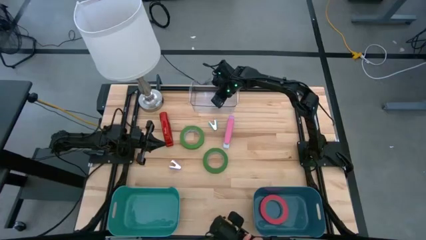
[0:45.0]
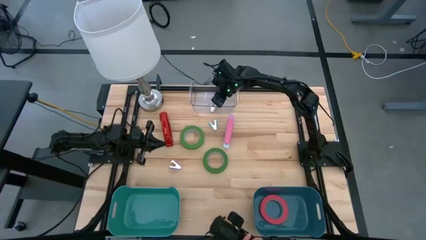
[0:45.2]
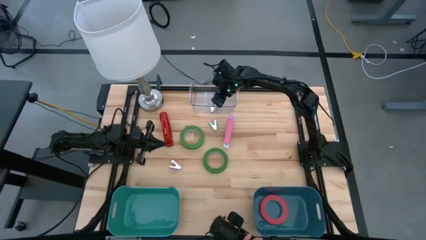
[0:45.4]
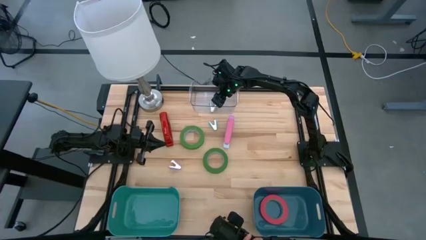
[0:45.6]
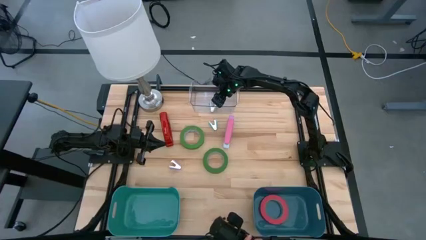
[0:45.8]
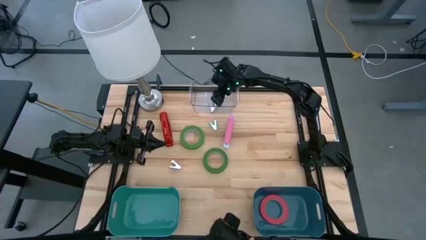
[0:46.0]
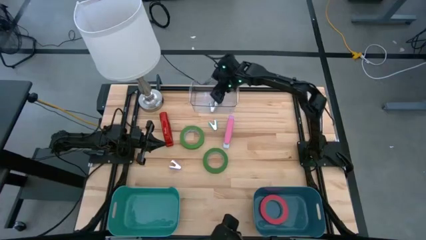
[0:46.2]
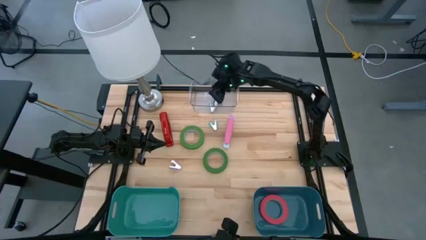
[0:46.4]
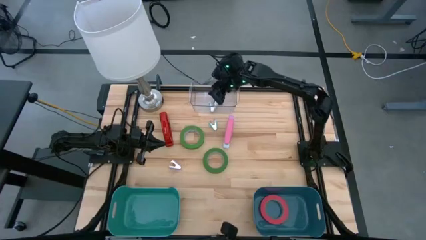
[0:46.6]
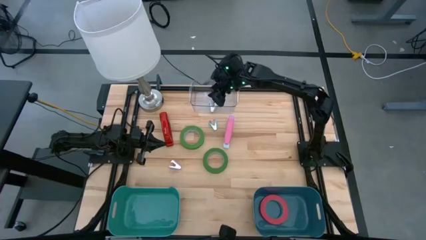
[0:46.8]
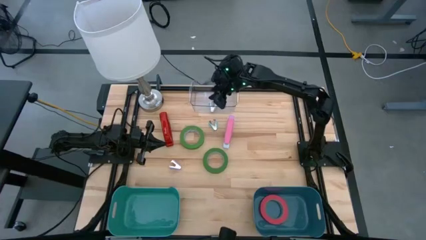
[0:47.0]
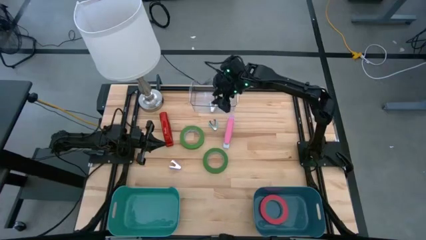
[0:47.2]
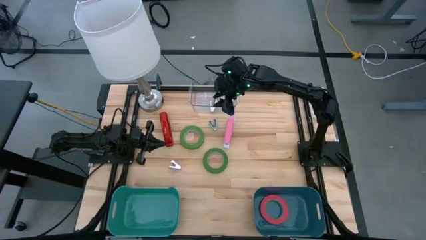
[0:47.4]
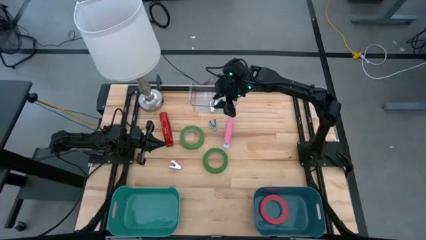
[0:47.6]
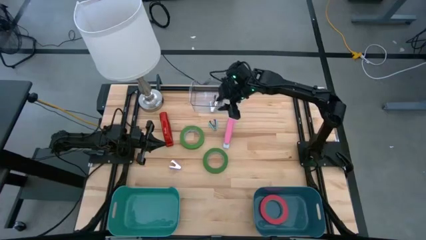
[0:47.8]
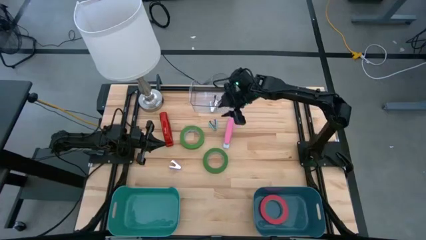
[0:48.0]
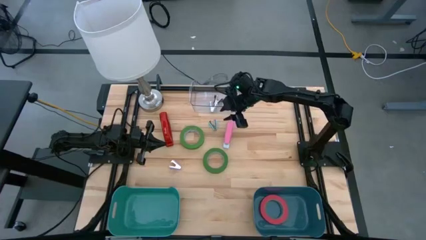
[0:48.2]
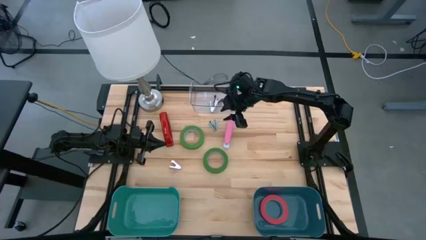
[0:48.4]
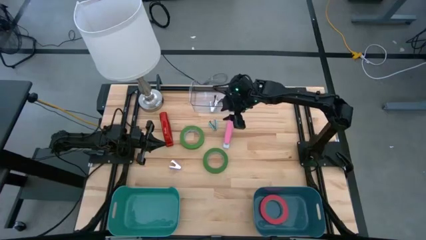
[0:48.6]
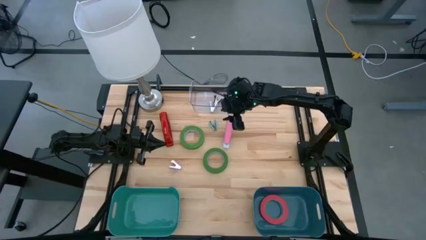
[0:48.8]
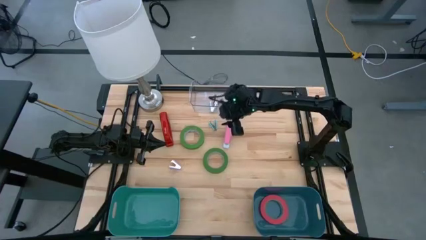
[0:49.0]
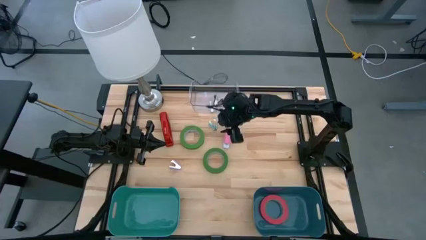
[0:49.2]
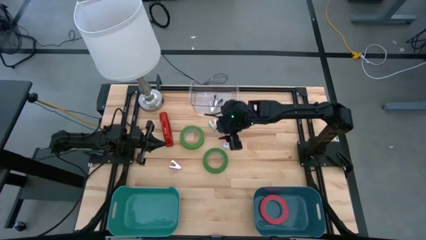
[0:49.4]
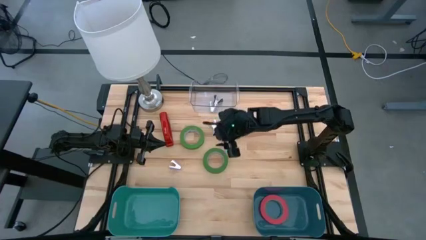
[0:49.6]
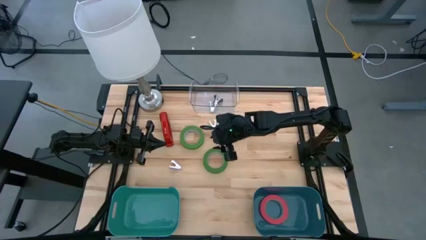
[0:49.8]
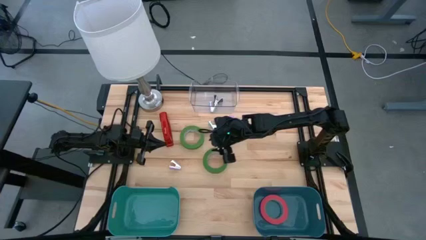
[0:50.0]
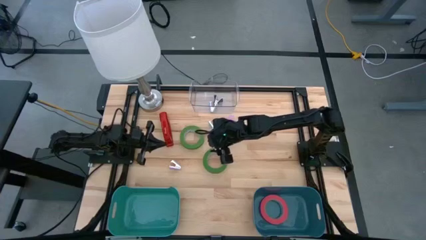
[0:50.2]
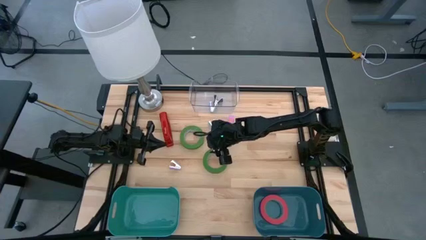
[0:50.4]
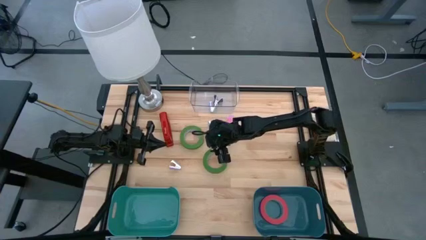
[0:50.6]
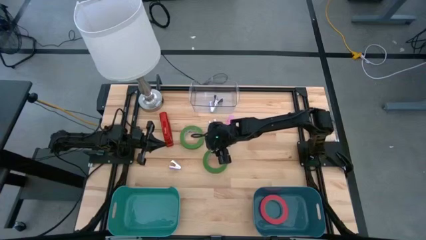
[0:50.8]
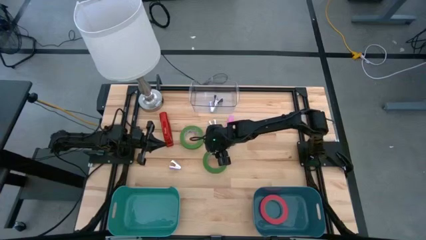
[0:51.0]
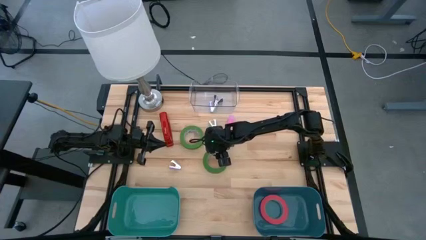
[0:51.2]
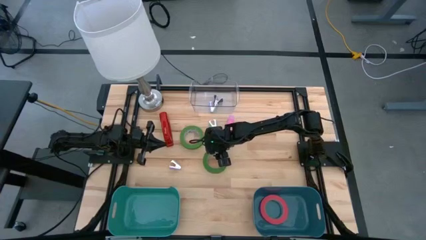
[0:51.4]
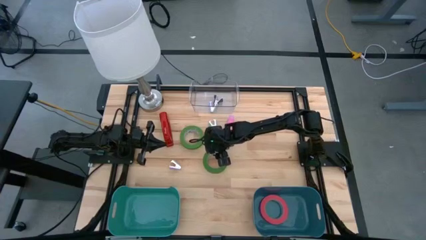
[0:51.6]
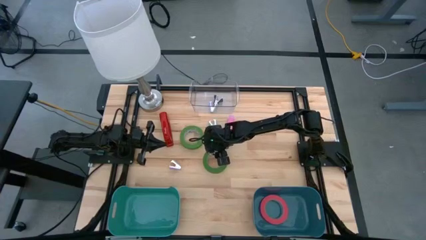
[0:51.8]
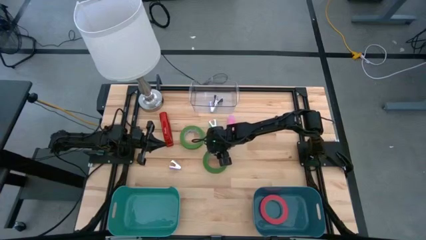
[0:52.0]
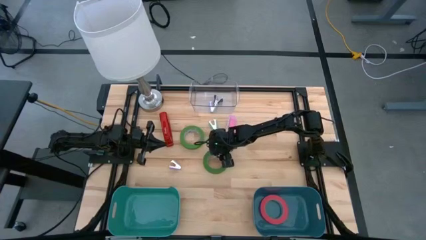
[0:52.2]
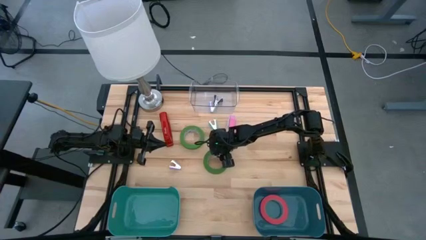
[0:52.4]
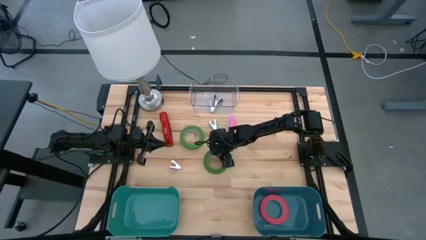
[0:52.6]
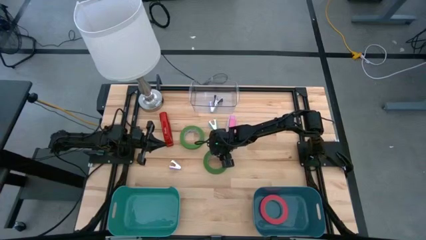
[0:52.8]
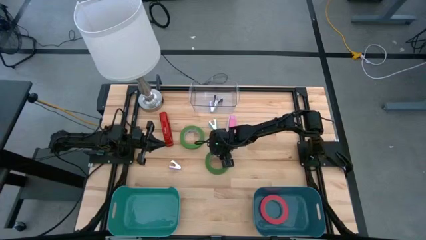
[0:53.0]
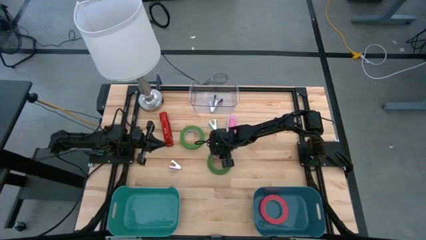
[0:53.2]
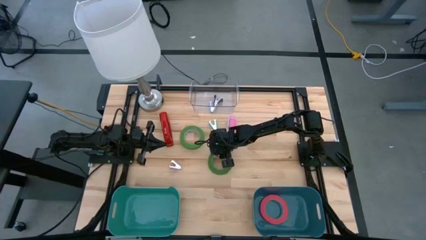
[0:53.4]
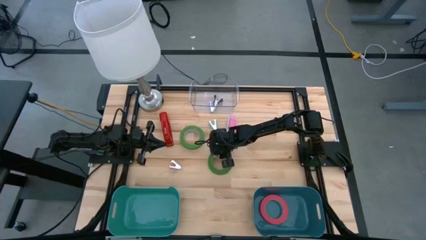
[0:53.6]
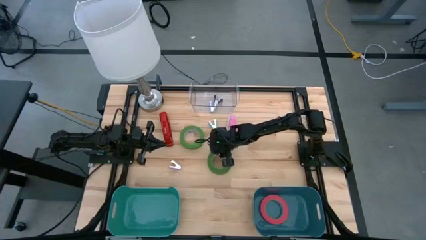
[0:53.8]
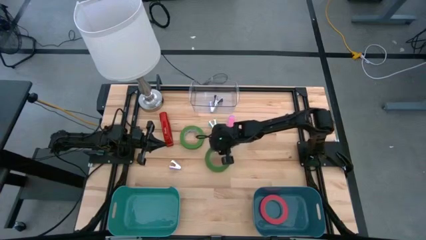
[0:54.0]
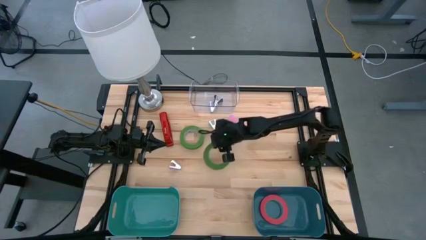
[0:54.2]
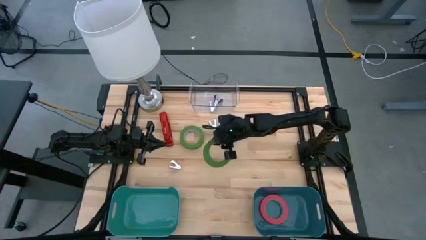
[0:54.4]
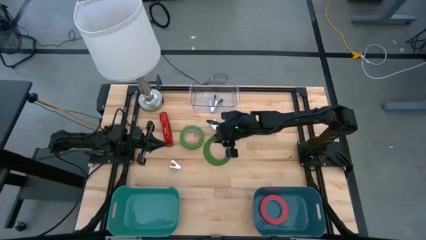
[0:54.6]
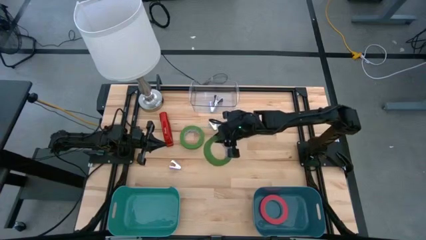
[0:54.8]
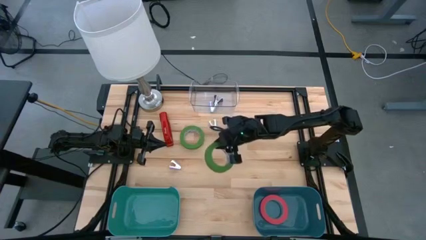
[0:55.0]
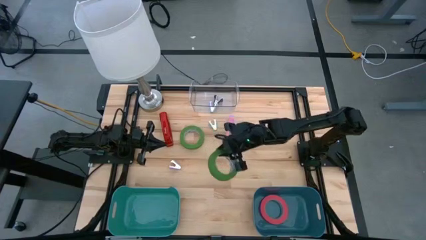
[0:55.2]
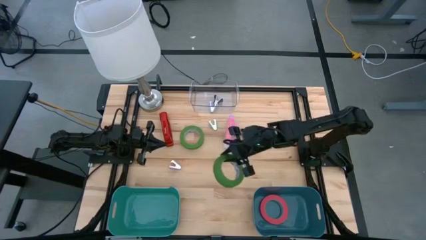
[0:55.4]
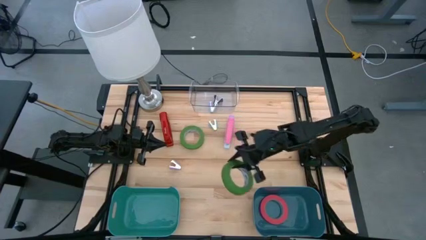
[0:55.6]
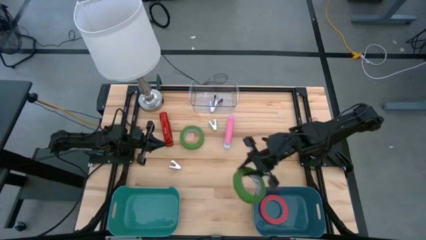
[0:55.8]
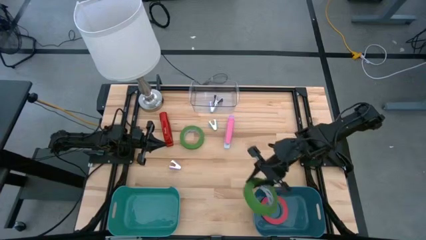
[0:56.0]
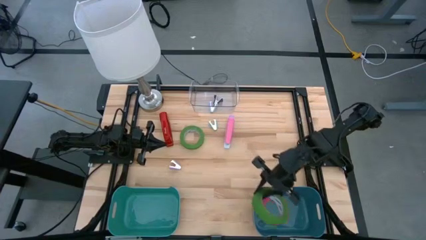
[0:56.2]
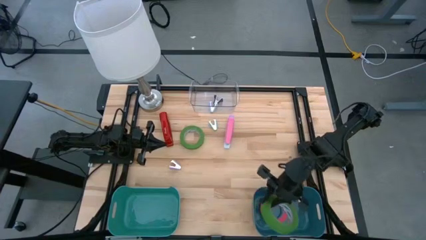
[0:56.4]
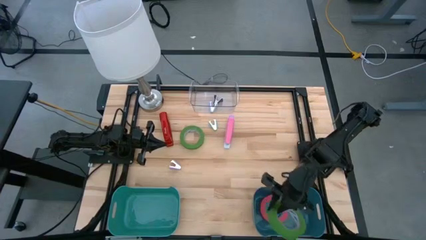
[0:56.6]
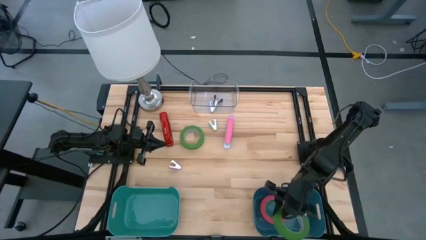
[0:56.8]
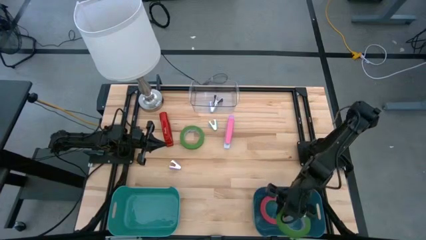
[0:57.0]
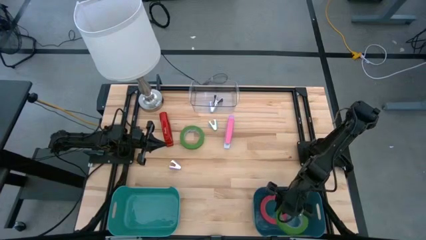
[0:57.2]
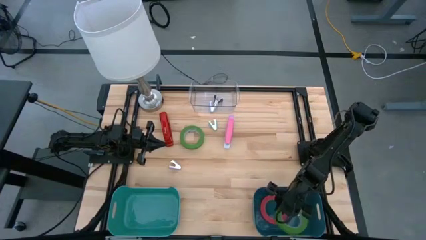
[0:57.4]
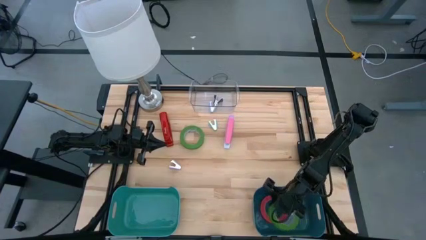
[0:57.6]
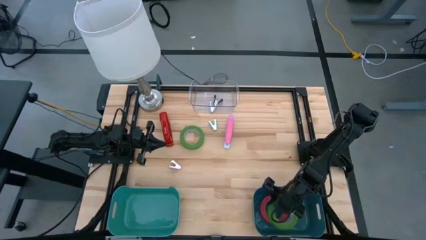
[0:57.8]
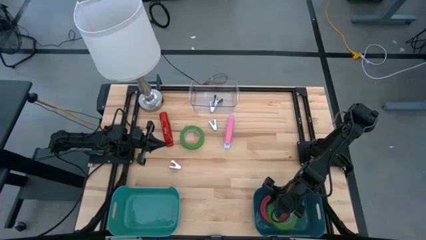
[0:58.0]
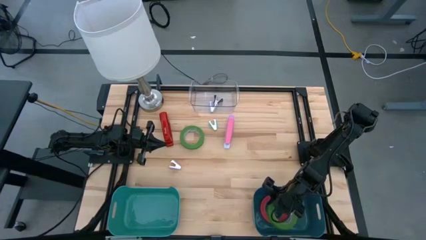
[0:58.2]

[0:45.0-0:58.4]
Task: Pick and place Stapler, Stapler remover, tape
Put the green tape into the blue bin
